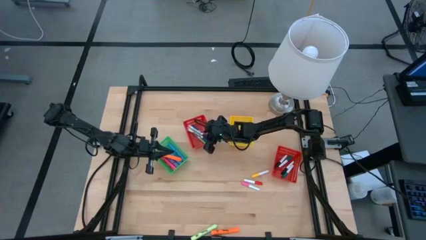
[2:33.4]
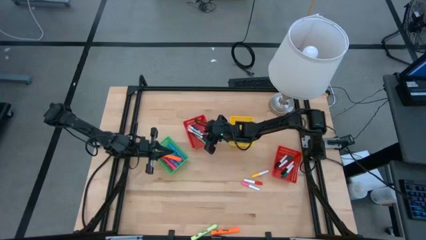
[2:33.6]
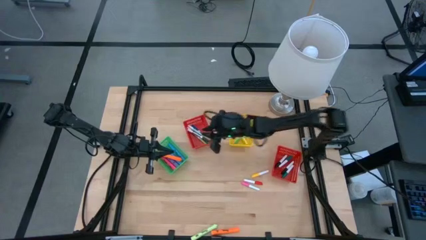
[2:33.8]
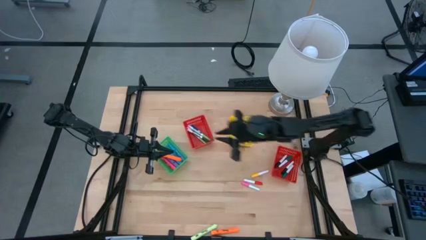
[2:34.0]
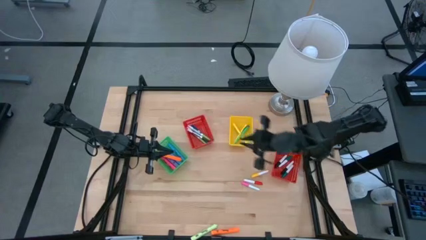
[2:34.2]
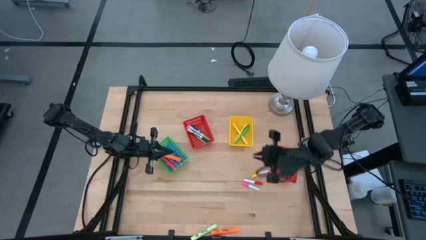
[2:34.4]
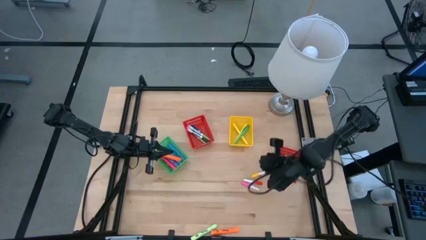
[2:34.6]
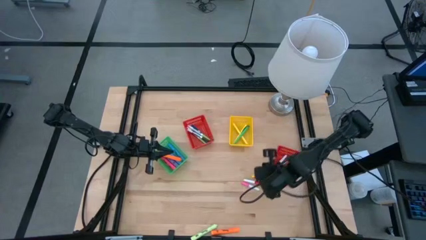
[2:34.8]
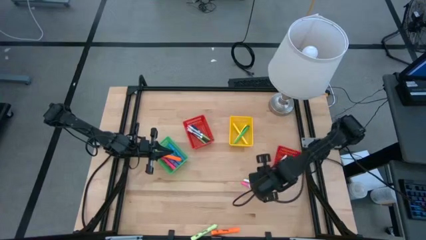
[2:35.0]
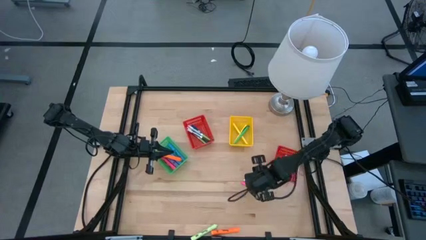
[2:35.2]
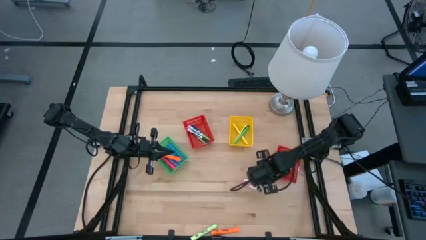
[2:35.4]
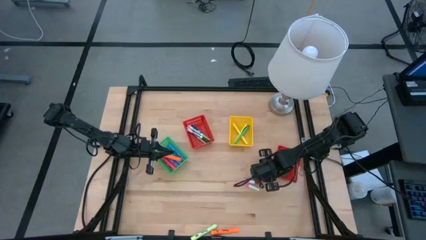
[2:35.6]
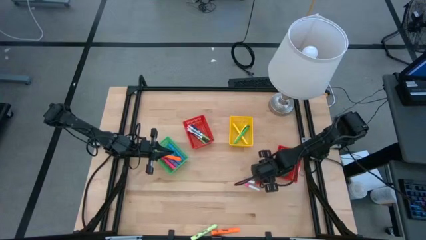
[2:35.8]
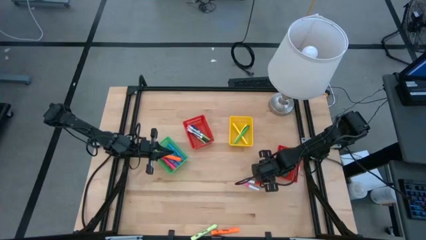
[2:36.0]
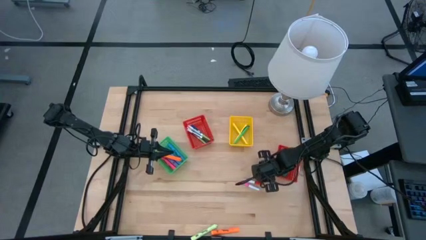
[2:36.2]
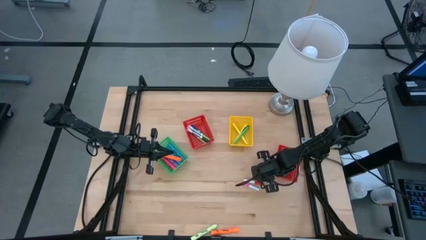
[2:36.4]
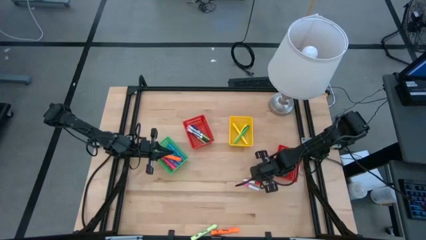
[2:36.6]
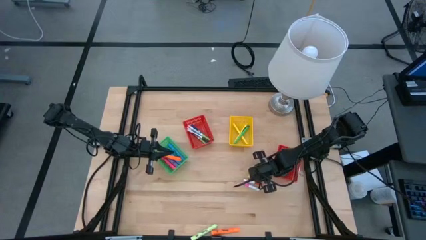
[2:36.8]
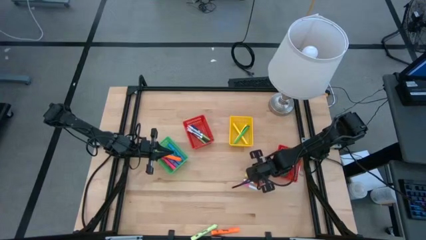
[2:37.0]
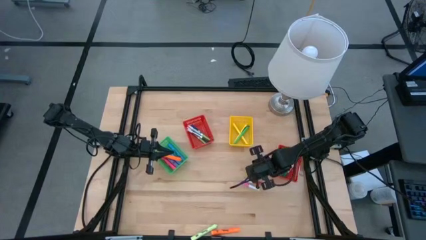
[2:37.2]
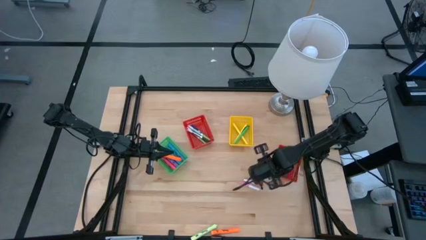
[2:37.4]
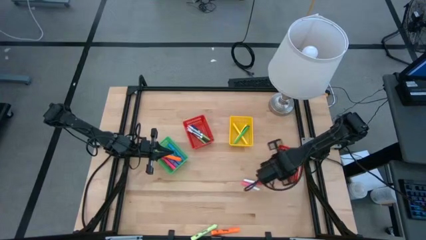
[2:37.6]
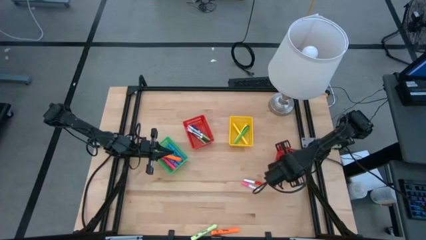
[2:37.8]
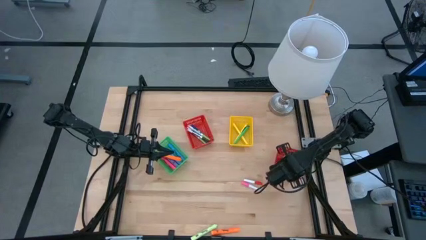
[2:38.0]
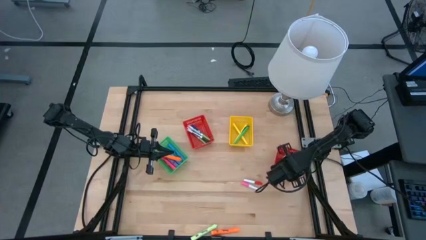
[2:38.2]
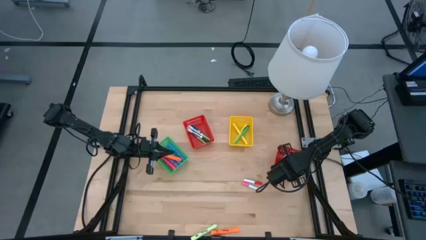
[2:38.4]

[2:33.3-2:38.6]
Task: Pick & Place Markers
Put the small yellow highlighter pen into the right red bin

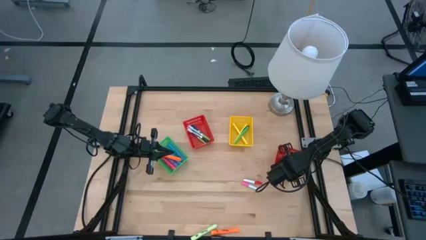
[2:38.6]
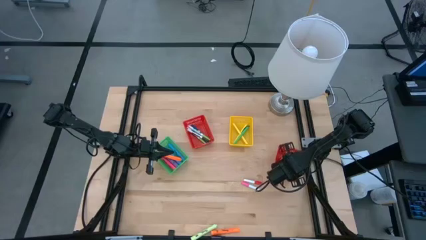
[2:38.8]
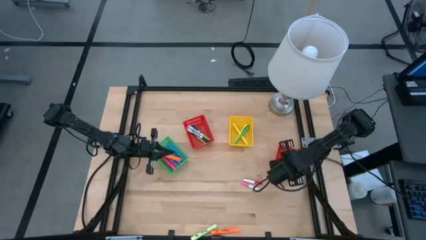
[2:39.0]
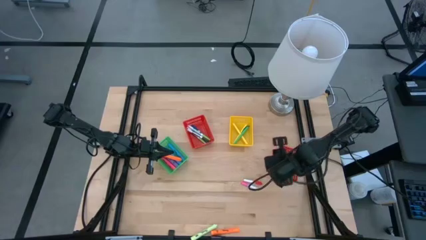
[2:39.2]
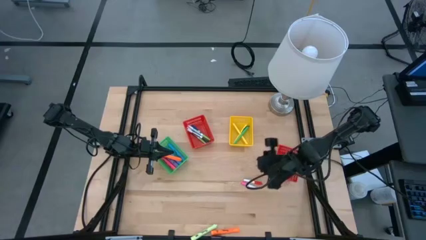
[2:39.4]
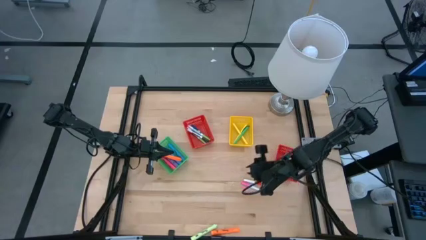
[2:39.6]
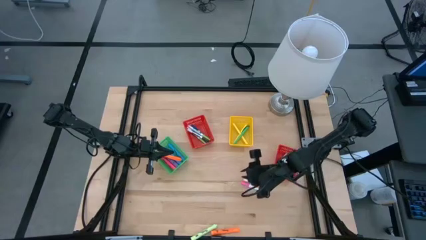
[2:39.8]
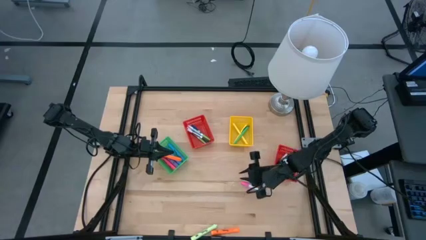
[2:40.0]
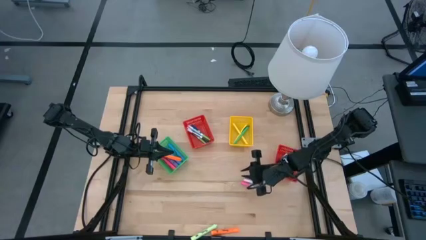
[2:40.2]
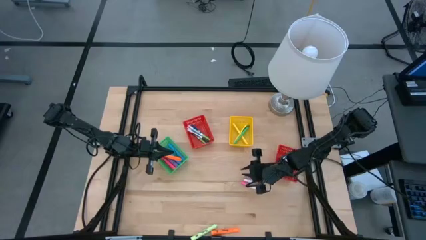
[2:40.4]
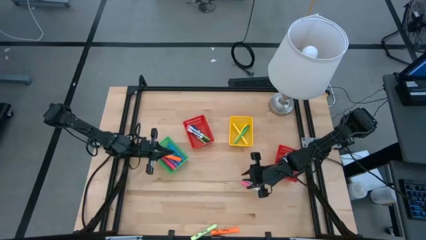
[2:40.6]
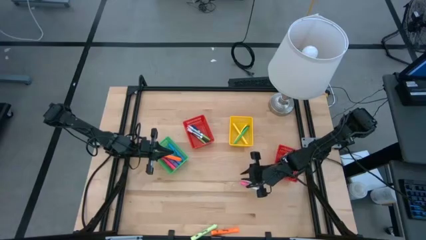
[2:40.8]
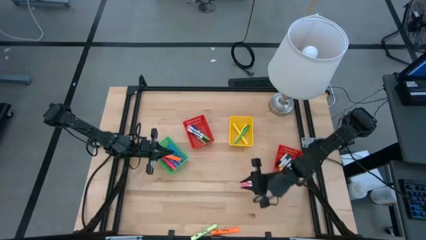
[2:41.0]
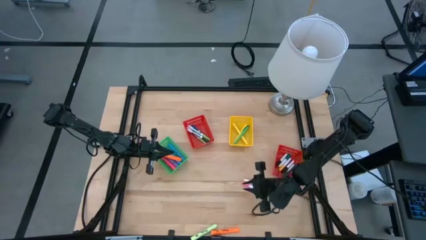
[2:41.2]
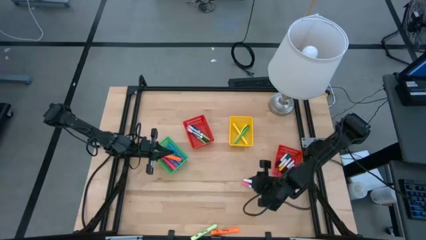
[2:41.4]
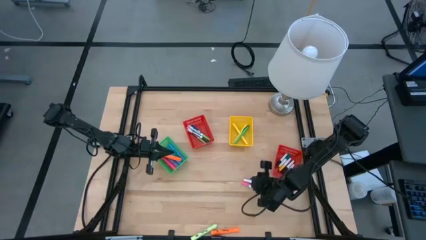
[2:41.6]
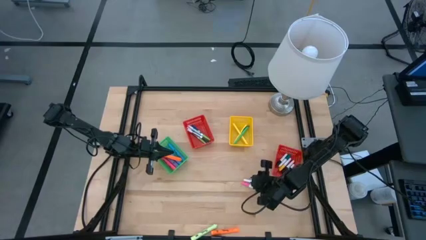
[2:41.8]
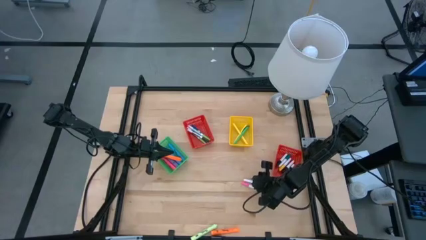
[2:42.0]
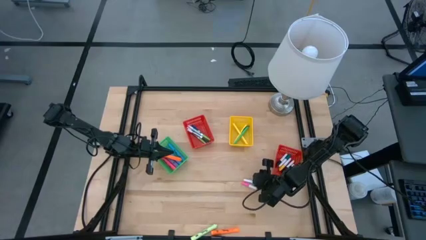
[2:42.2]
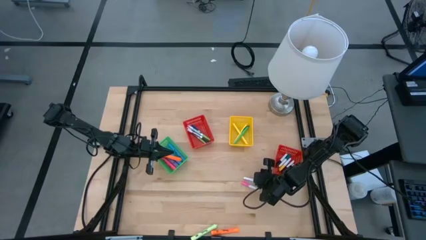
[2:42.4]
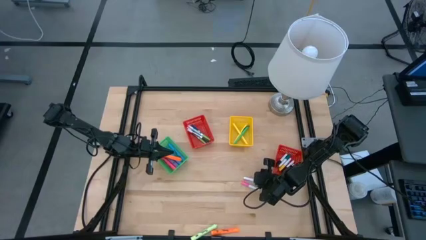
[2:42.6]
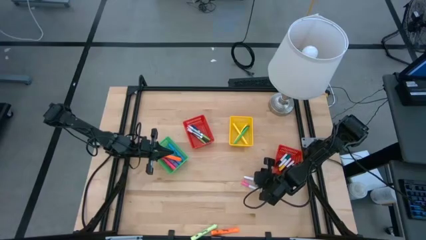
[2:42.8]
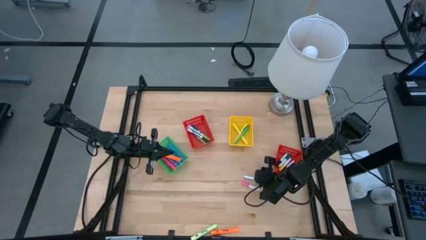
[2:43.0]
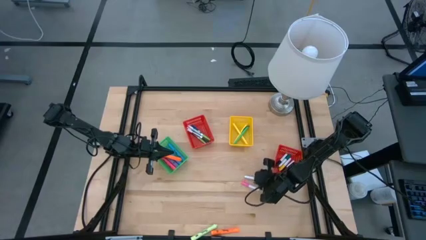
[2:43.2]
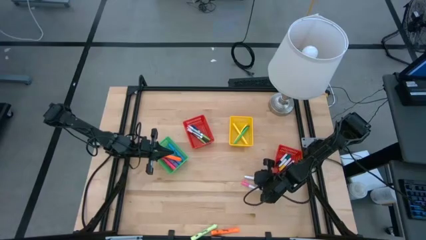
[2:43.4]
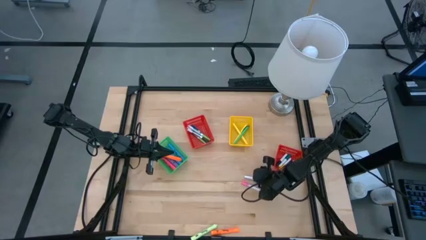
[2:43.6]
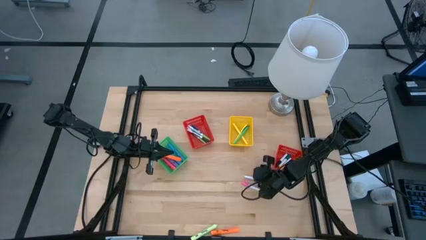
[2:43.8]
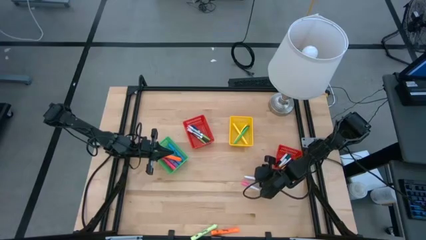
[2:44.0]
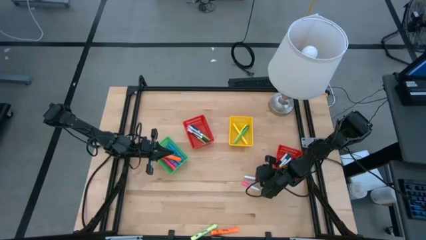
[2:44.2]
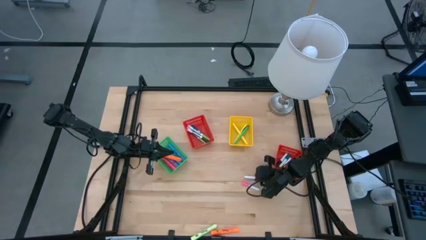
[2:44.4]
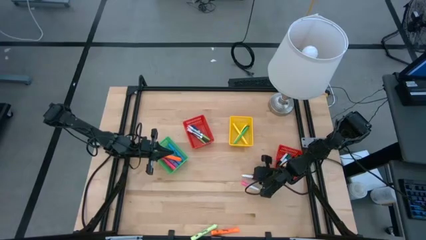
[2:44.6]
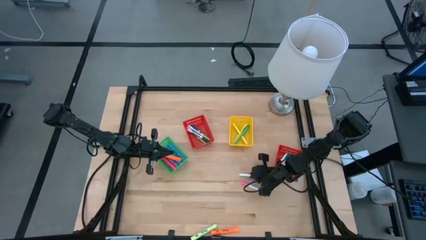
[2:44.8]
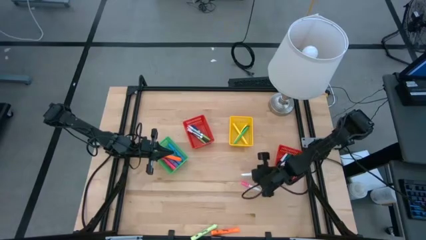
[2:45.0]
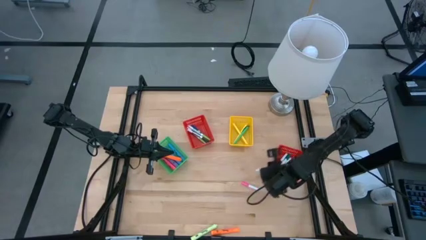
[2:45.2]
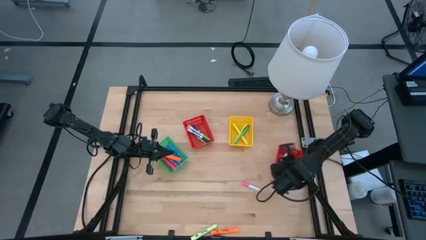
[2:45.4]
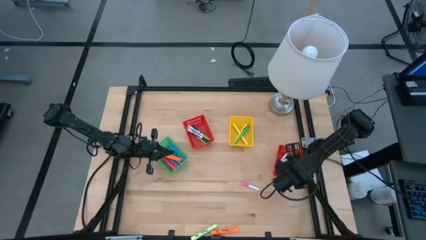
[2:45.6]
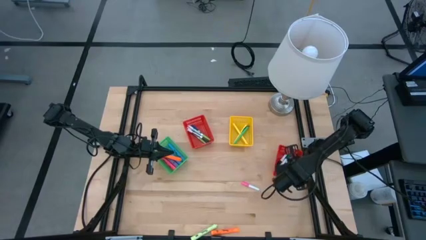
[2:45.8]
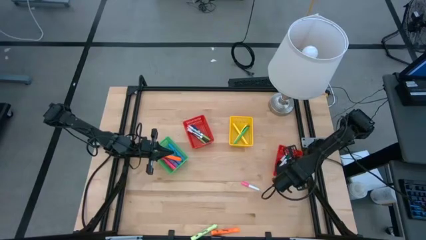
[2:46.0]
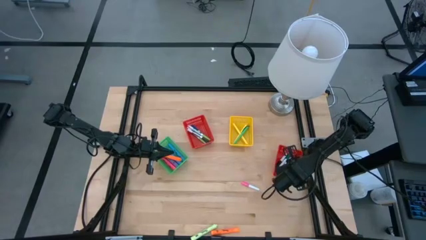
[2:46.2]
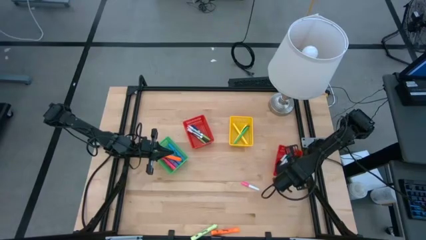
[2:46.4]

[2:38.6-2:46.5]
Put the small red highlighter pen into the right red bin
